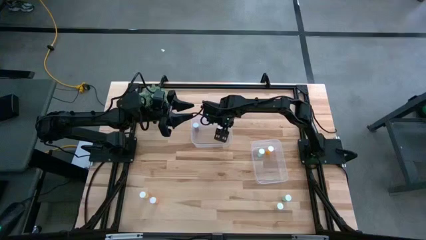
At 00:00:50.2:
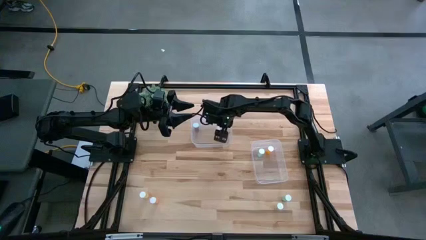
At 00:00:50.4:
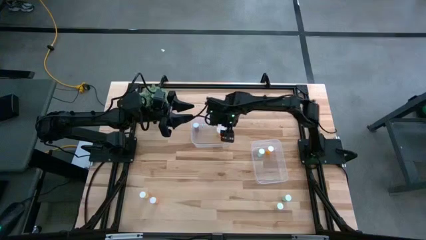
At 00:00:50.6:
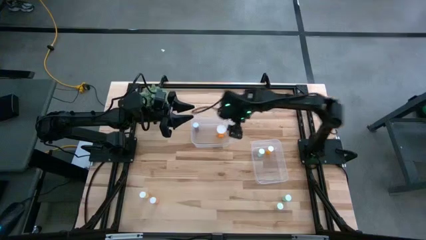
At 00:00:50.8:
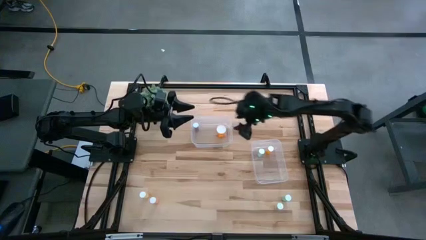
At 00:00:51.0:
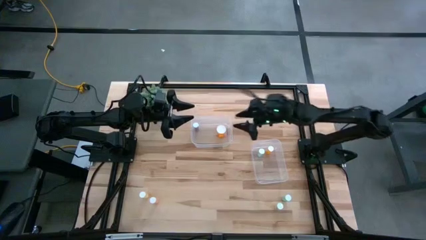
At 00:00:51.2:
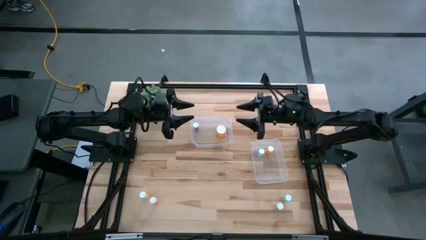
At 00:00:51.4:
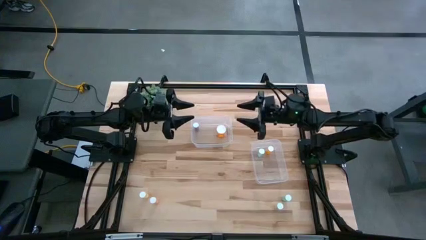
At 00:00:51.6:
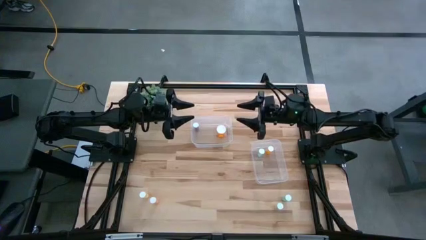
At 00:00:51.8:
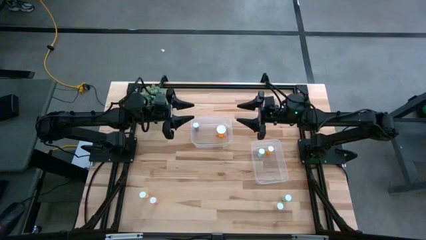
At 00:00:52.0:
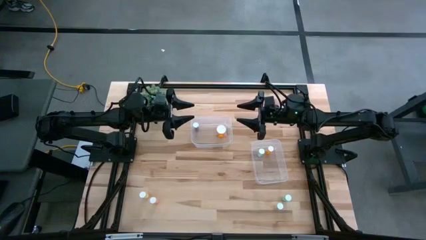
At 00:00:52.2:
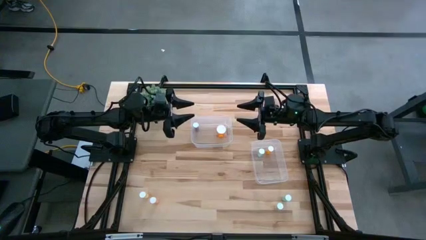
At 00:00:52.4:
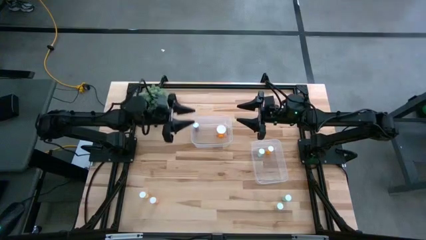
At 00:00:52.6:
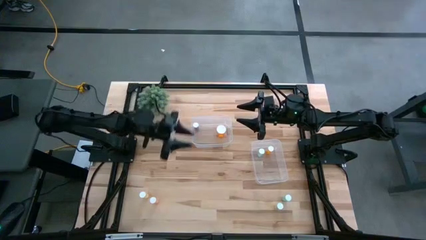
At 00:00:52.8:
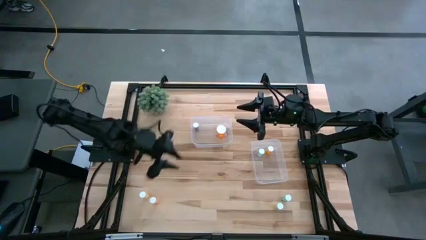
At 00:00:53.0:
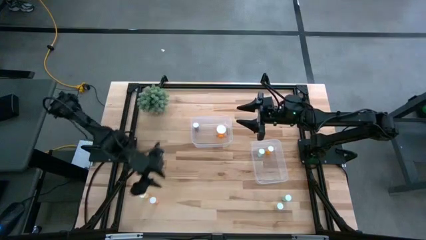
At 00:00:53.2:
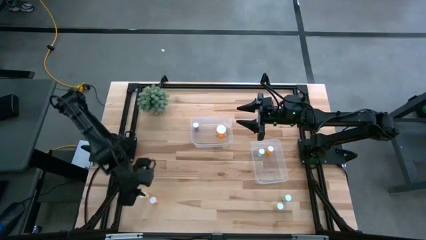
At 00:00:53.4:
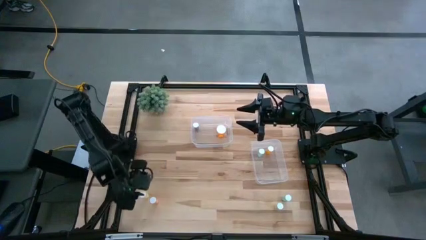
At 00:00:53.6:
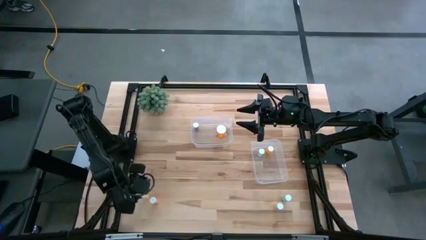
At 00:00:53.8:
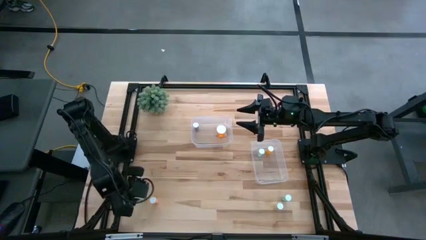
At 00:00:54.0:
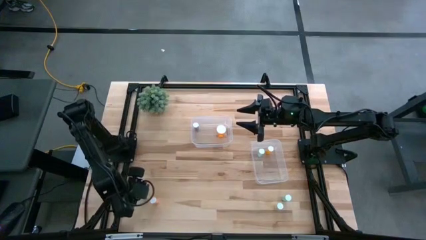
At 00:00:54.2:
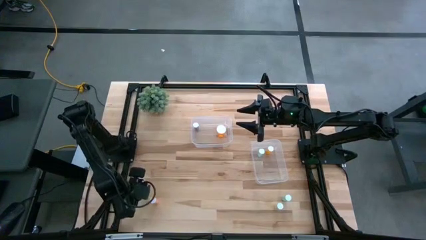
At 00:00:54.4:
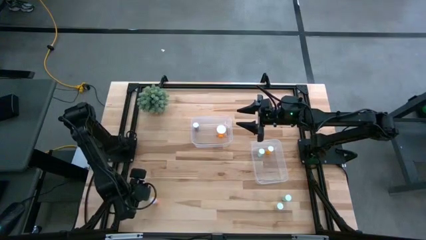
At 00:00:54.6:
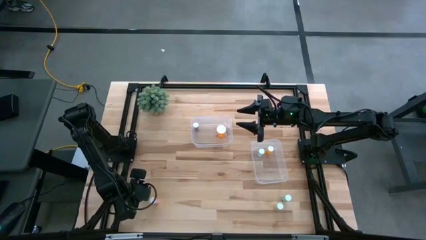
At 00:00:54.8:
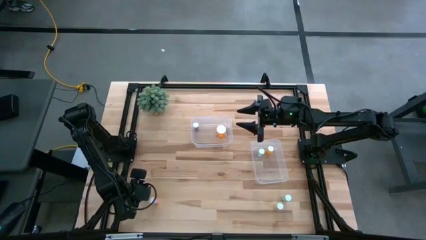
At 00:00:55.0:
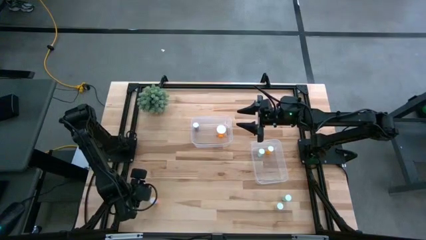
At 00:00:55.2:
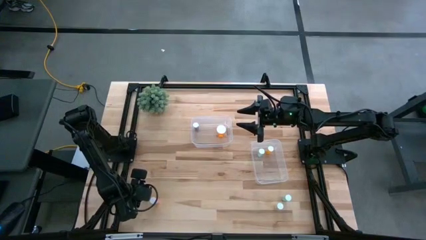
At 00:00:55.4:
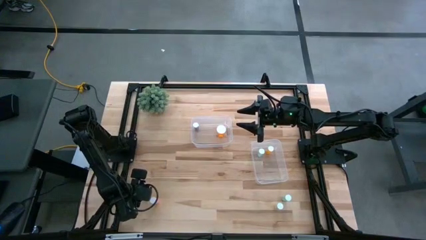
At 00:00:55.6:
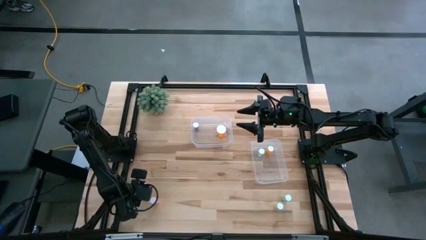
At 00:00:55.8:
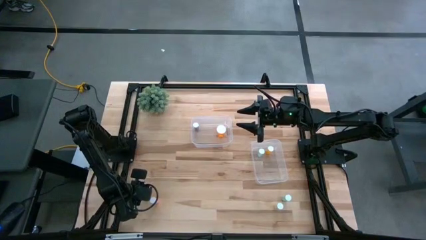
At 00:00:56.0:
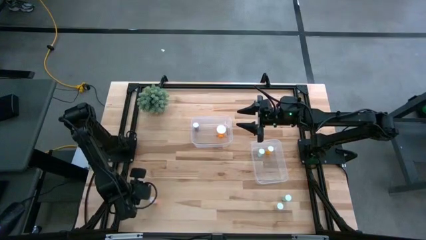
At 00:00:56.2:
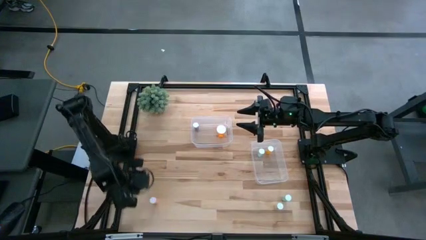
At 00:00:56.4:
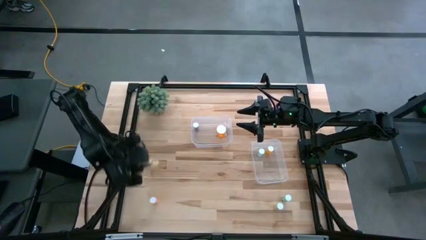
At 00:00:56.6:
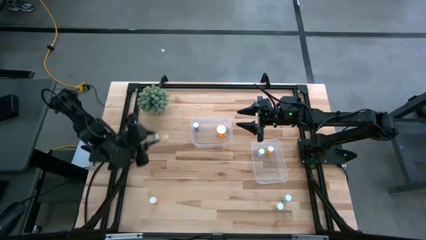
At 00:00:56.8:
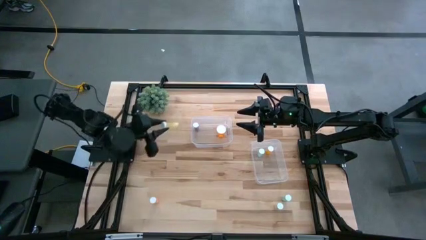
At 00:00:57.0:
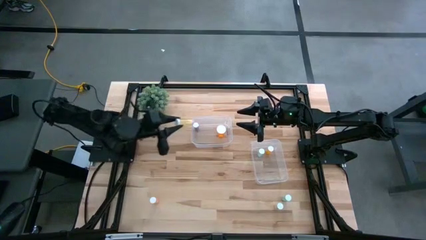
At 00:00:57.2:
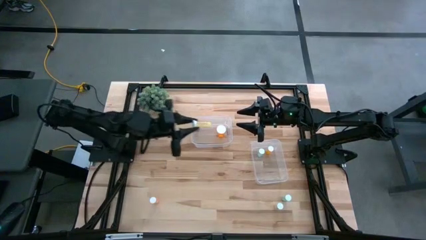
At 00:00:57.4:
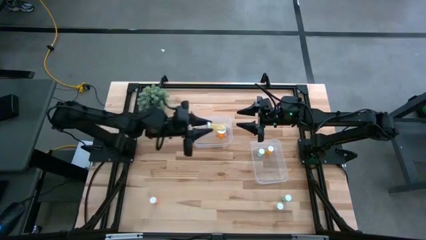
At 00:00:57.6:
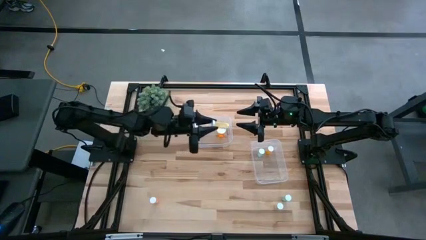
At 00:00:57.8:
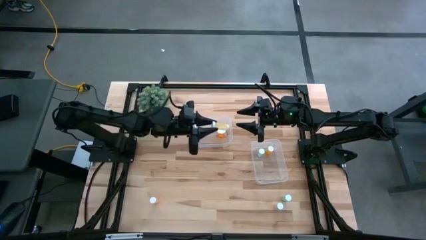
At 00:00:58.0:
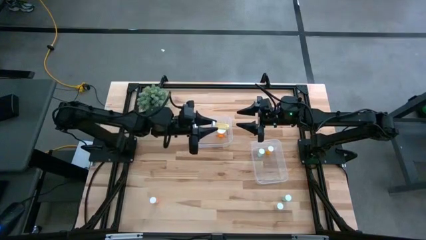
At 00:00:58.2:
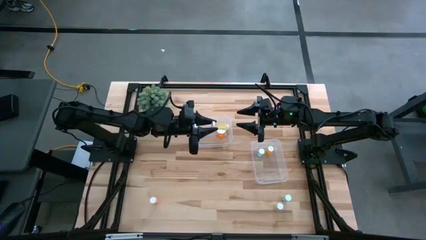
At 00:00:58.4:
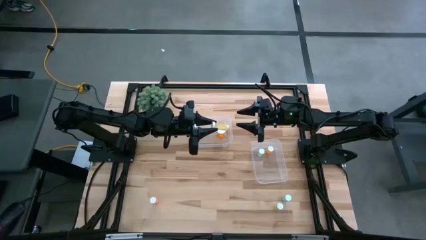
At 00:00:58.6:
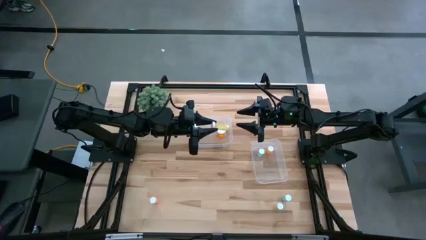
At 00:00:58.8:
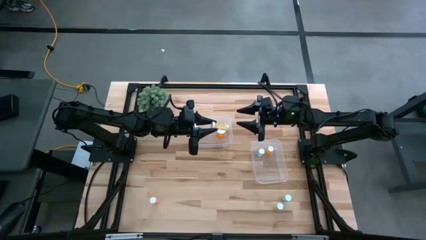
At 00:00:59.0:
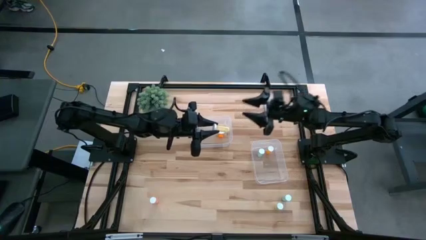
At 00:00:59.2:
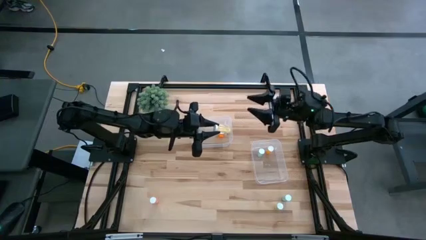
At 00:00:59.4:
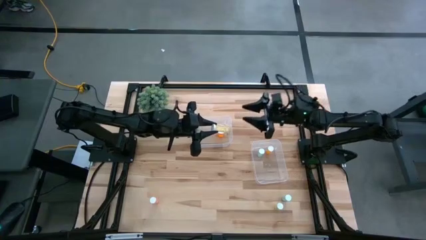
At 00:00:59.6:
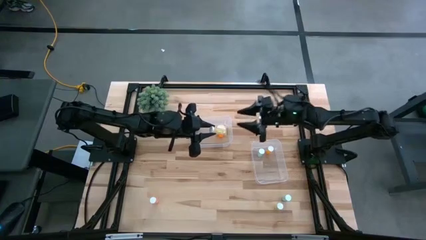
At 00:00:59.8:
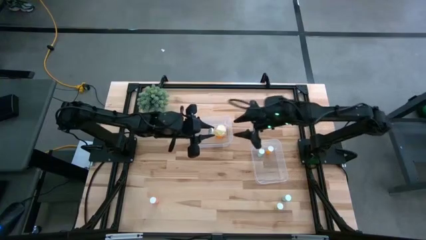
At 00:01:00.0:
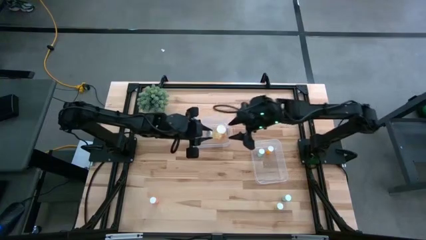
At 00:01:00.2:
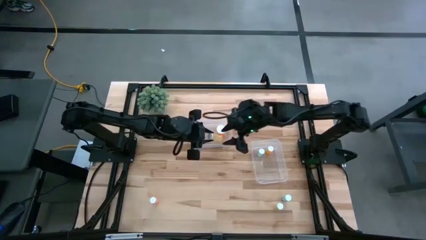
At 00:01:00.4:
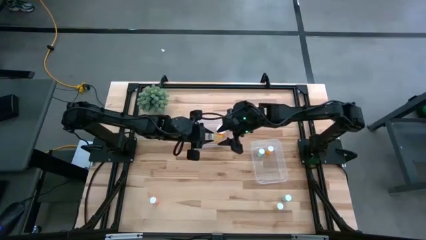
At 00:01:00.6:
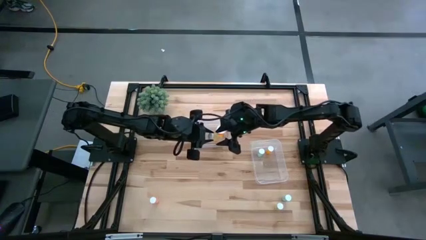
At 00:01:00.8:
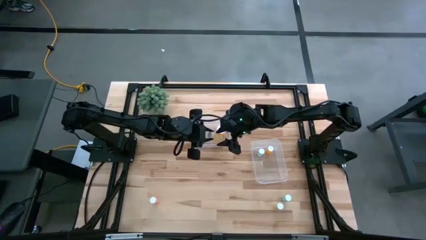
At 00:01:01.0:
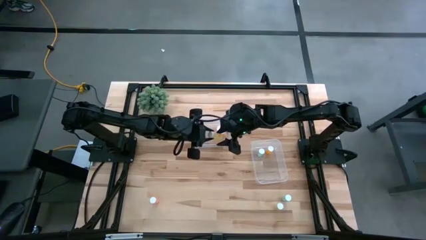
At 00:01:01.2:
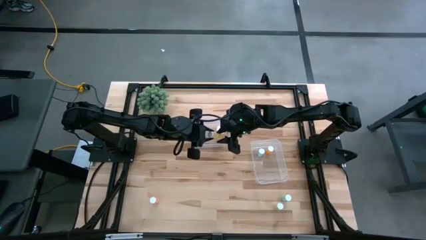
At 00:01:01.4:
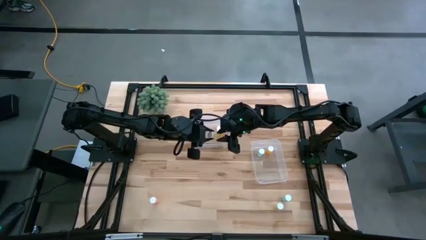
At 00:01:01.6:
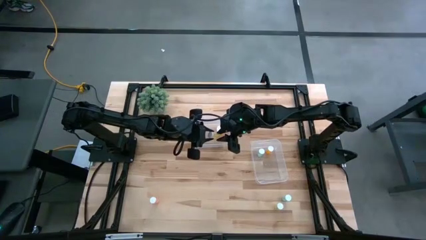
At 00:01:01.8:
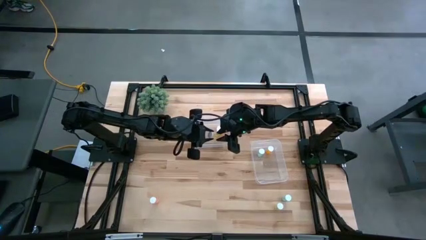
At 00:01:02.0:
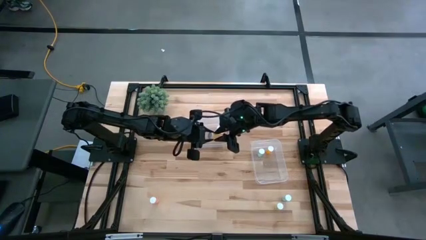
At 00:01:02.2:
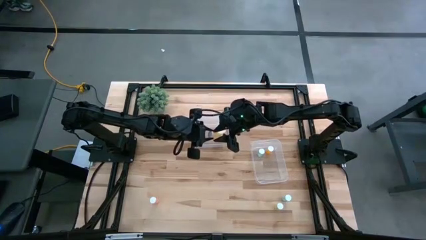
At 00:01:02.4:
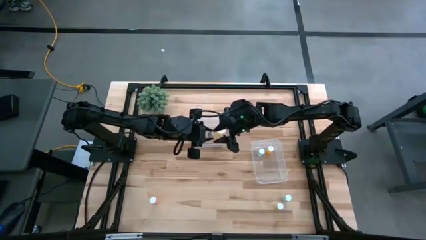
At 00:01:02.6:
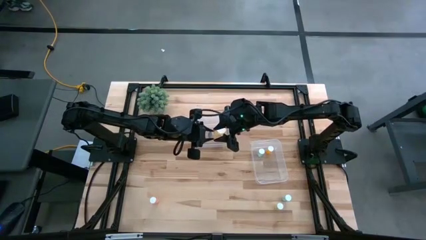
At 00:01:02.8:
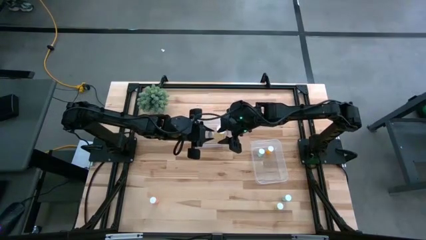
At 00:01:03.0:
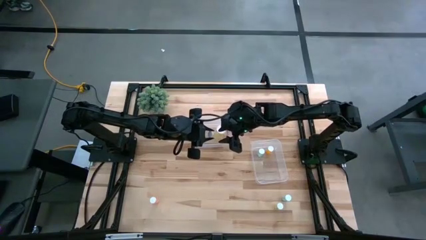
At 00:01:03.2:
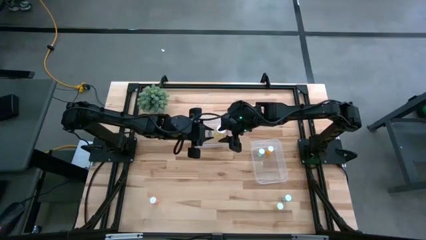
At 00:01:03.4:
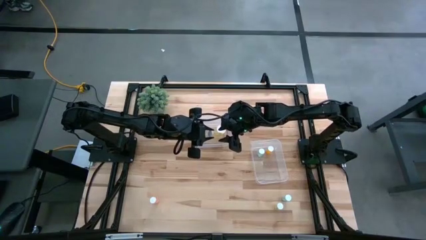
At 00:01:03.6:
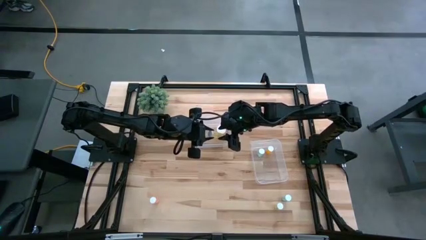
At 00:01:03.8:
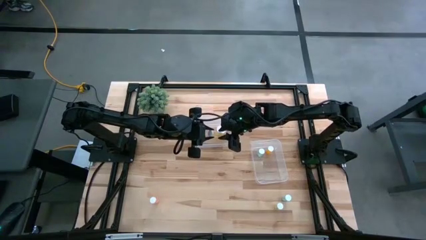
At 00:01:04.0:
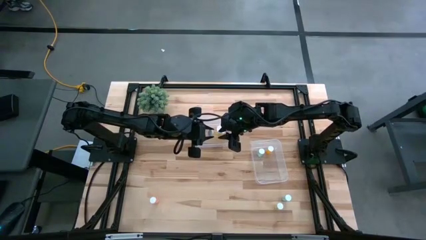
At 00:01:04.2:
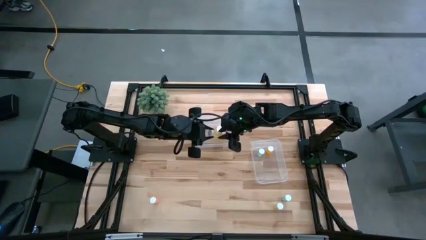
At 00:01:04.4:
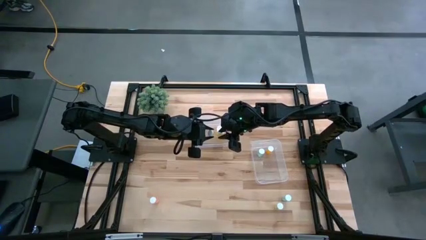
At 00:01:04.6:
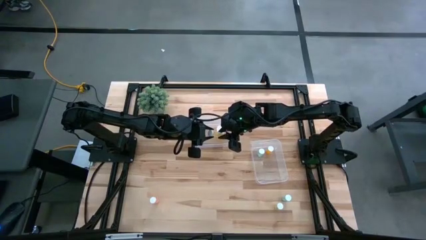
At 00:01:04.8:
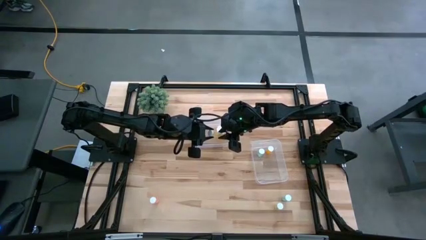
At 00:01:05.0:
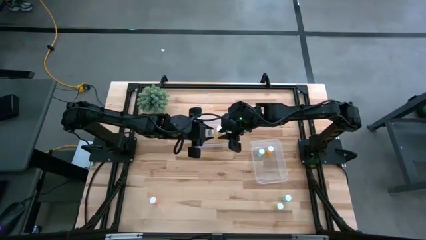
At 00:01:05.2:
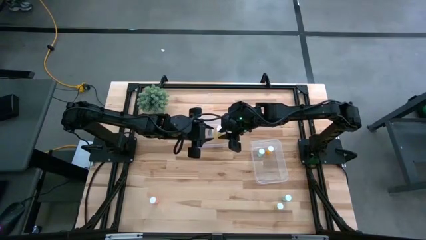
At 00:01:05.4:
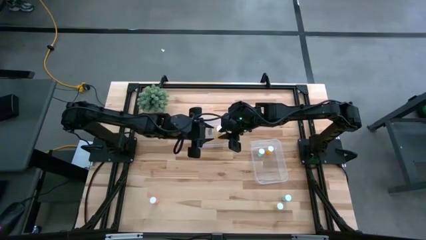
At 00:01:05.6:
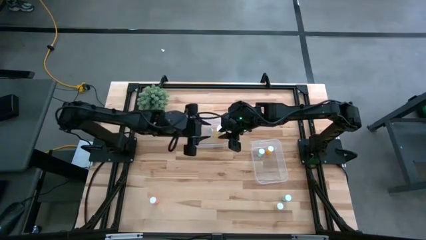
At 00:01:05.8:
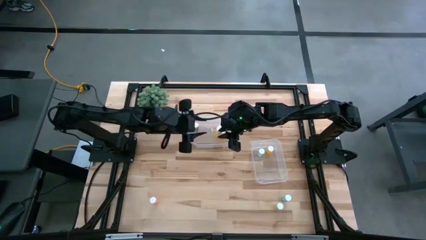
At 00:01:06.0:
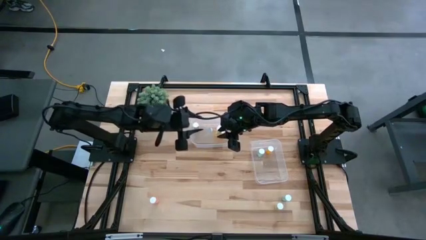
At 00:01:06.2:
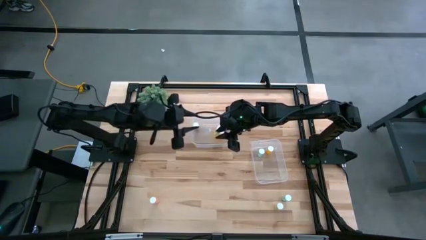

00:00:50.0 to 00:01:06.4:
Task: Pick and place medicine bottles into bin by pill shape (circle, oval)
Put the left yellow tablet bottle into the bottom transparent bin
